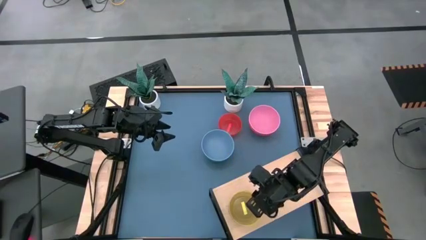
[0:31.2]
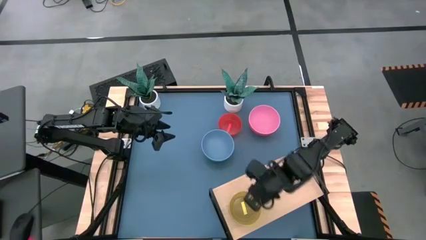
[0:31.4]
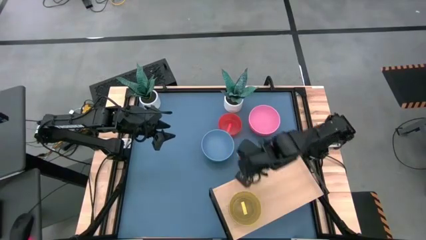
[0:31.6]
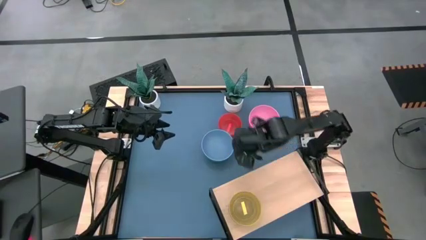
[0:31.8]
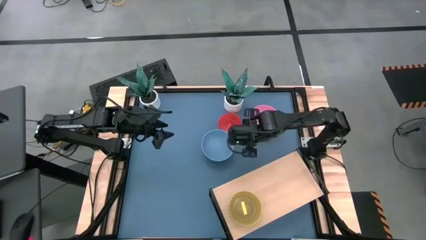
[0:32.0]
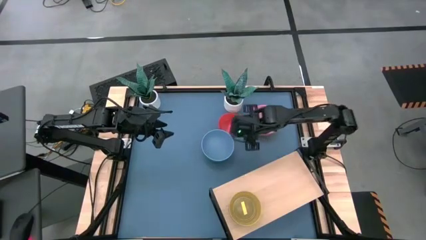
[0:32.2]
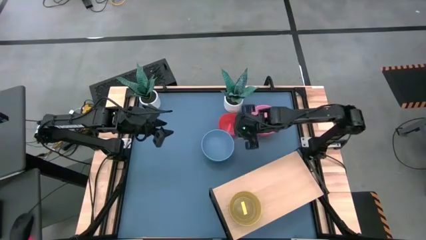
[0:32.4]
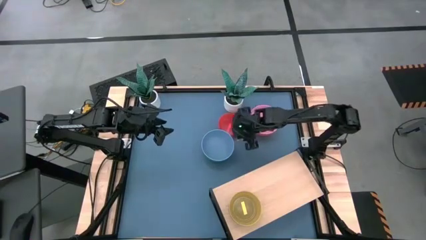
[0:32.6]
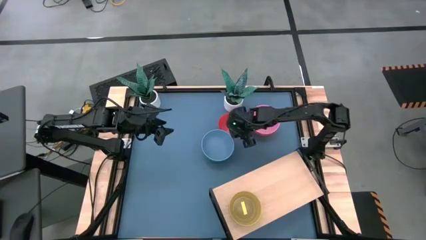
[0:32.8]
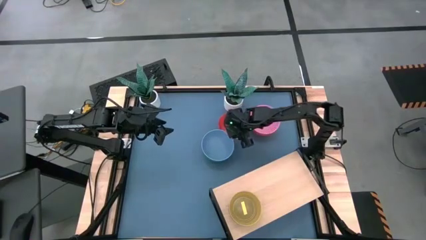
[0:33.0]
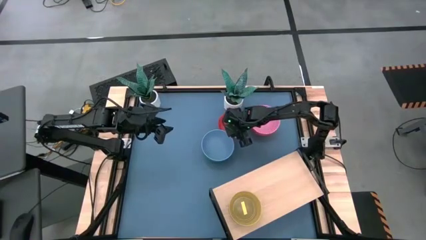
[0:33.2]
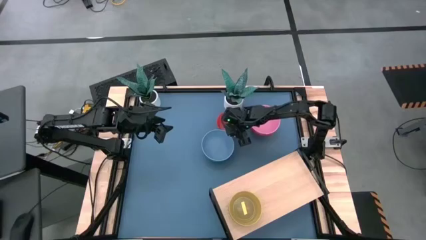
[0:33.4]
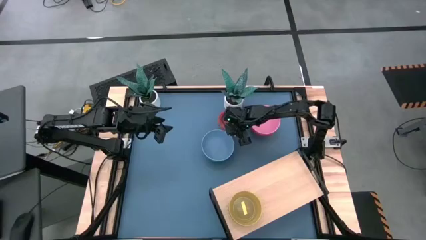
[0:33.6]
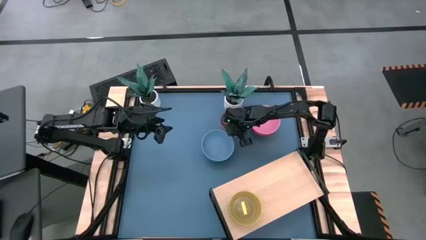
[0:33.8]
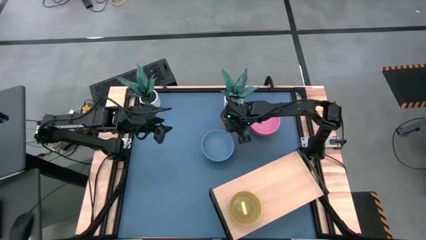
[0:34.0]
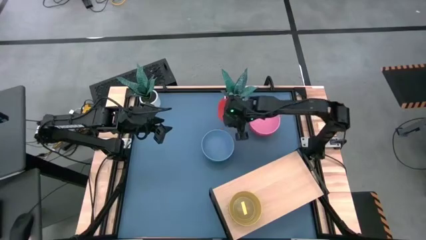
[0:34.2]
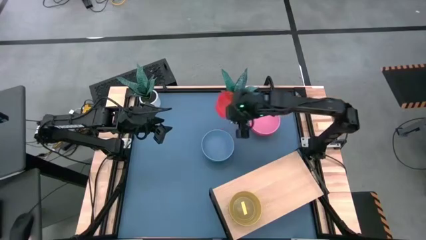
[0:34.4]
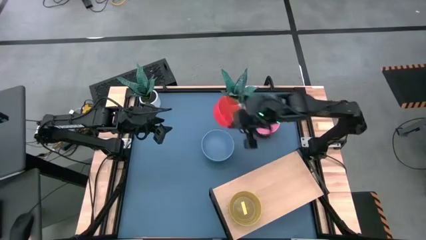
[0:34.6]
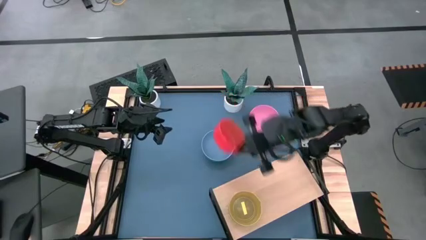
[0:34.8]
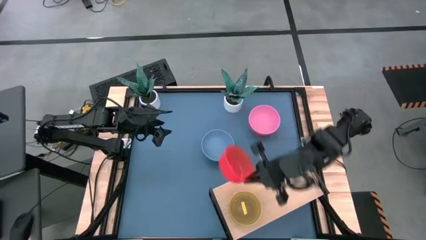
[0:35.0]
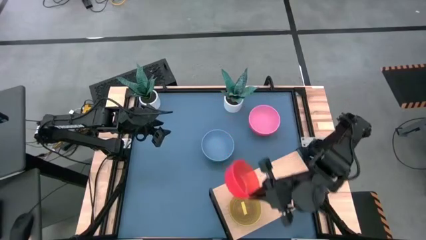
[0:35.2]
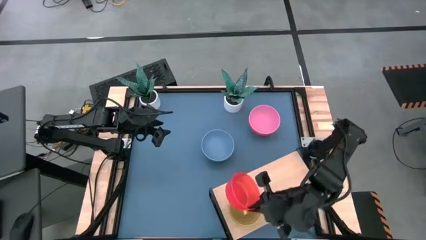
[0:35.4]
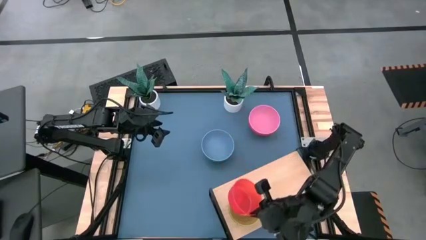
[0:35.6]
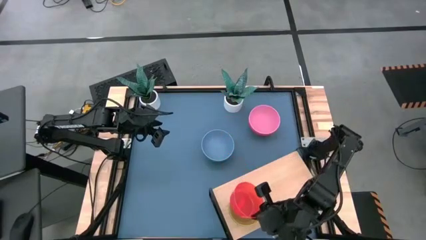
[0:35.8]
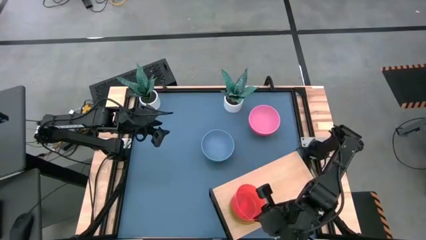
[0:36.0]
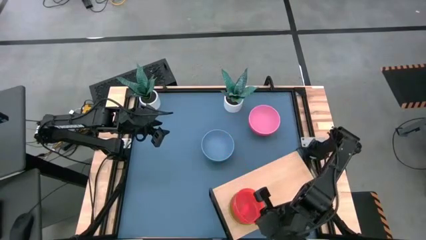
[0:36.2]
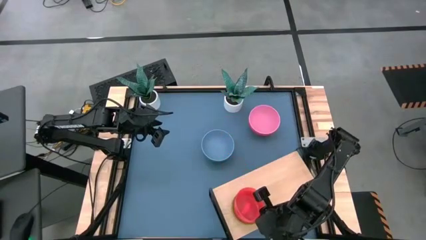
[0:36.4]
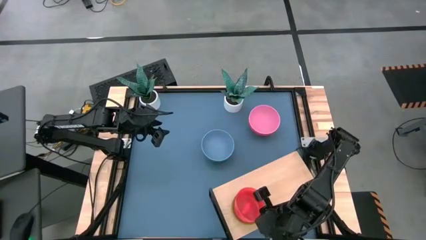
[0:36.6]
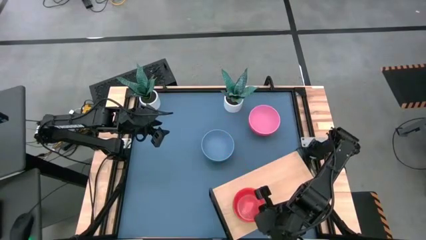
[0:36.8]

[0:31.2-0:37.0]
Task: Place and stack bowls onto a shelf
Stack the orange bowl on top of the yellow bowl on the shelf

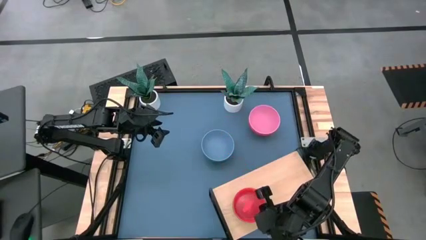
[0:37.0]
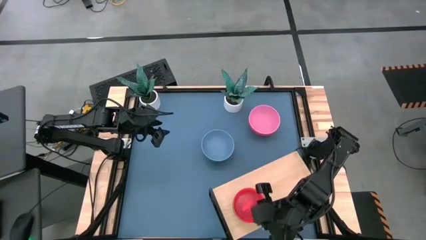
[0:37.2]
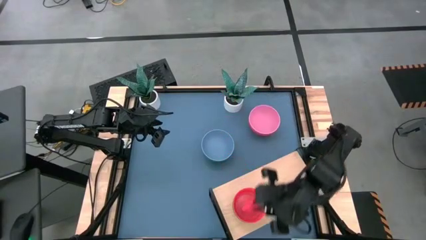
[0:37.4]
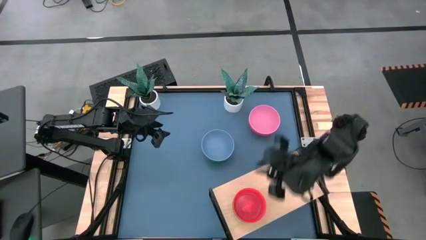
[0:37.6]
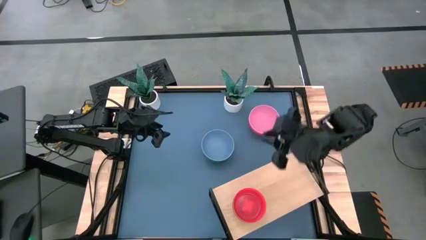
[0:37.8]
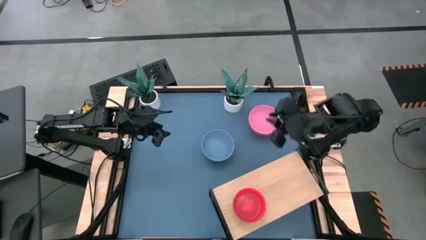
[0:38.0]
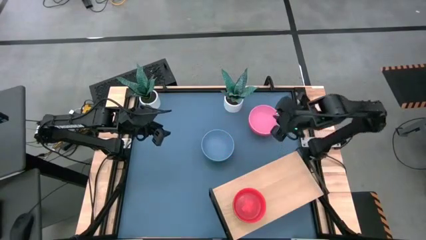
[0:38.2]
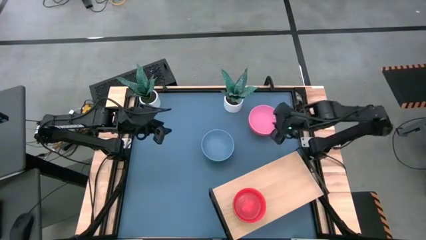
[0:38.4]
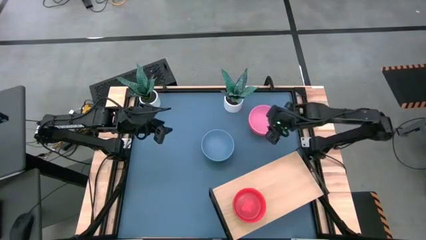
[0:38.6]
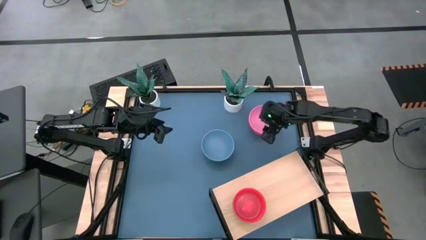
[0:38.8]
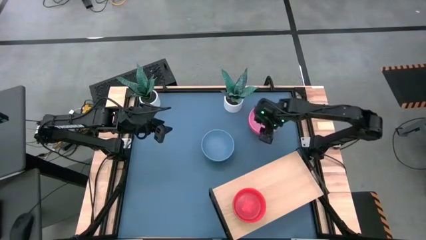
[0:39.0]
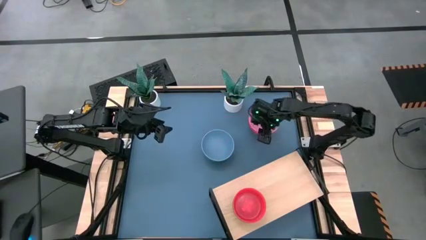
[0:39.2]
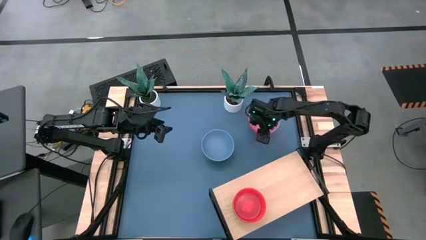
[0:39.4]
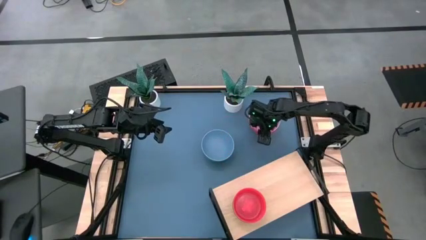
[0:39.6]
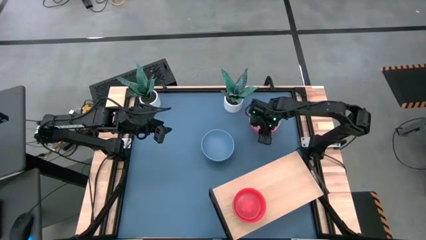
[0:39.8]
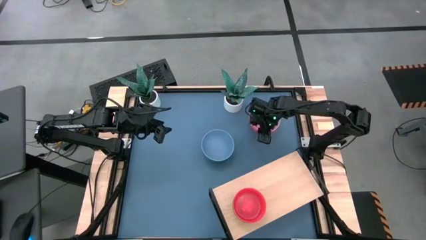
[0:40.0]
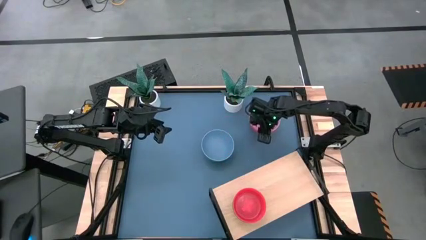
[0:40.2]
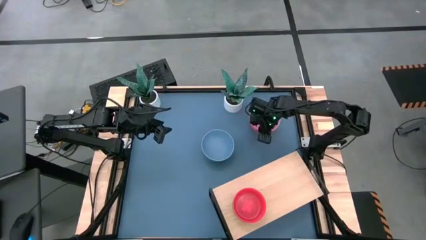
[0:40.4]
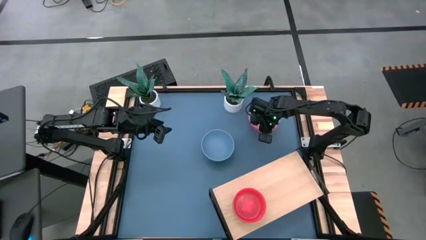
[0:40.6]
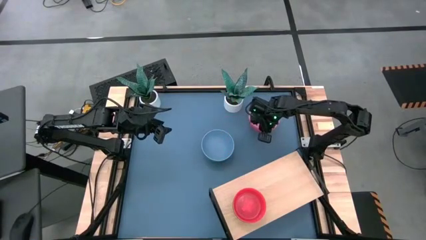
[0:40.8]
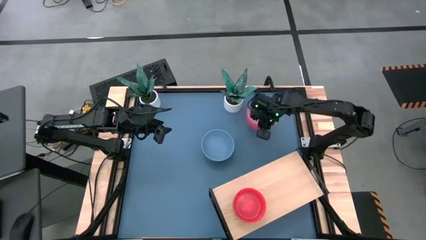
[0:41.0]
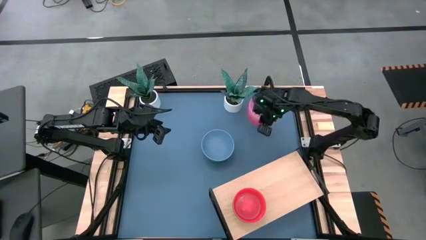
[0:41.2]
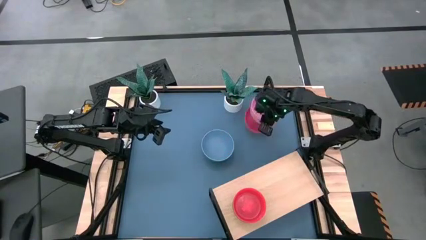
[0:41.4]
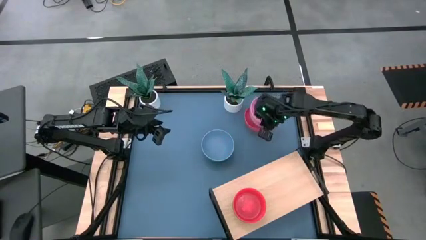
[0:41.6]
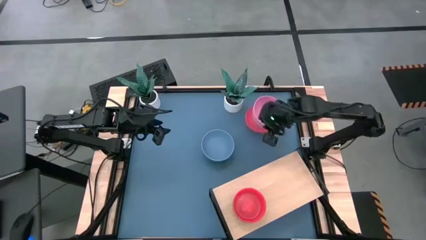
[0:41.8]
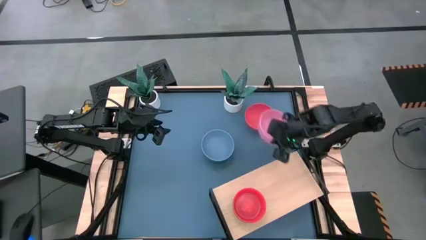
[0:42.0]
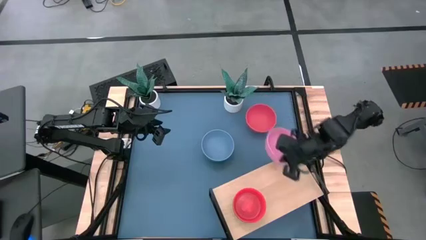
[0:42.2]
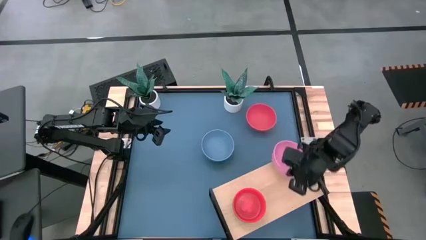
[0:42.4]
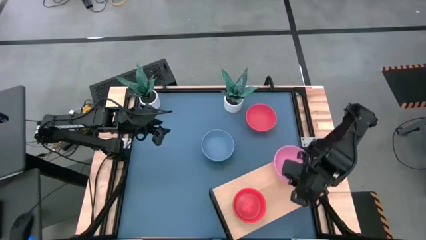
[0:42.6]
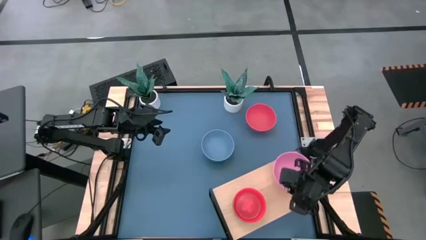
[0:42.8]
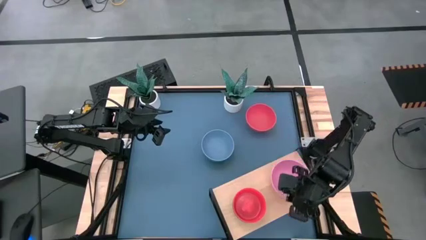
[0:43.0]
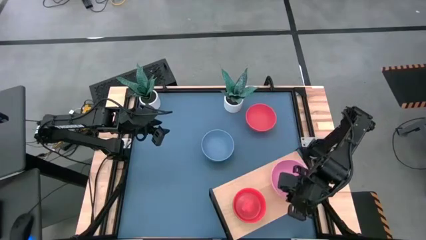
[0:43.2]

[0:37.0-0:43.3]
Put the pink bowl on the shelf

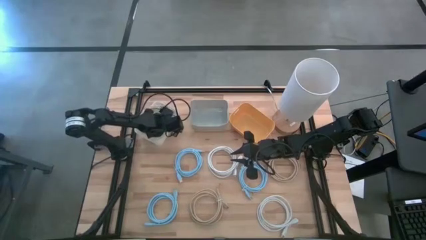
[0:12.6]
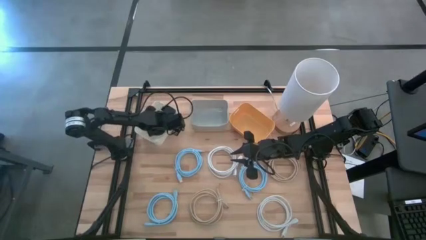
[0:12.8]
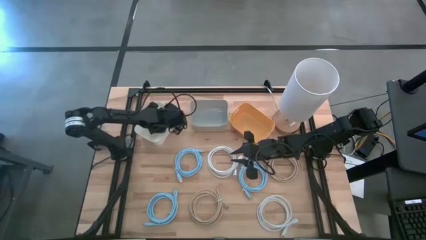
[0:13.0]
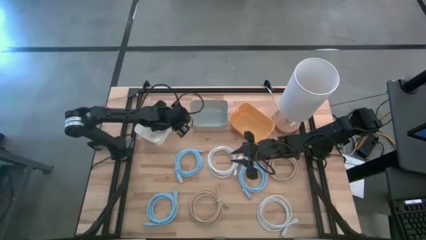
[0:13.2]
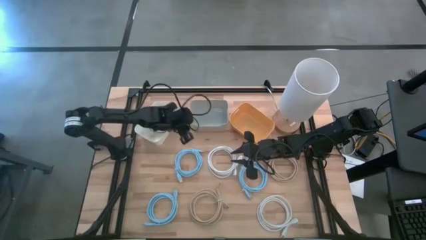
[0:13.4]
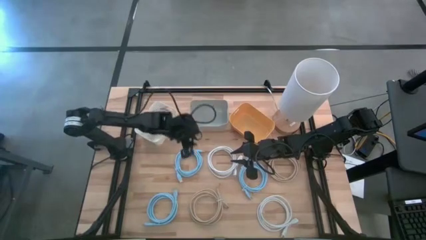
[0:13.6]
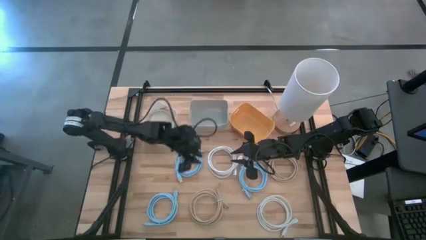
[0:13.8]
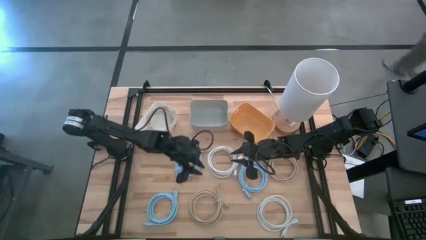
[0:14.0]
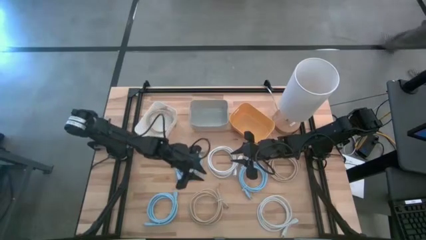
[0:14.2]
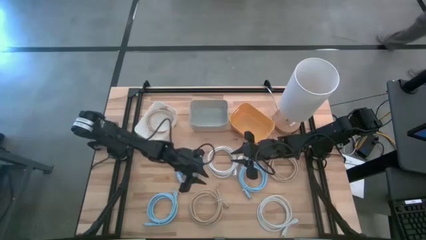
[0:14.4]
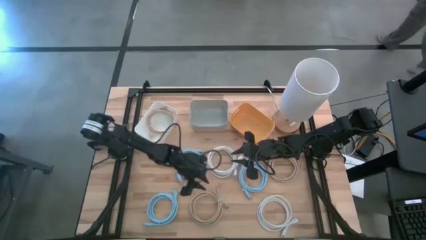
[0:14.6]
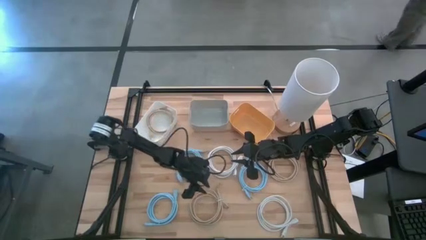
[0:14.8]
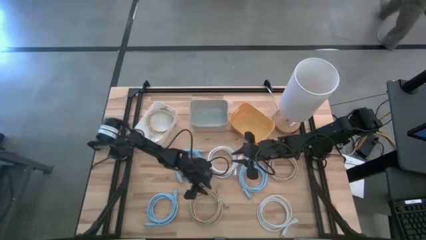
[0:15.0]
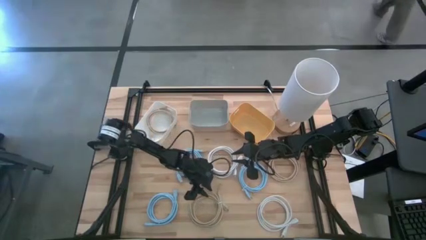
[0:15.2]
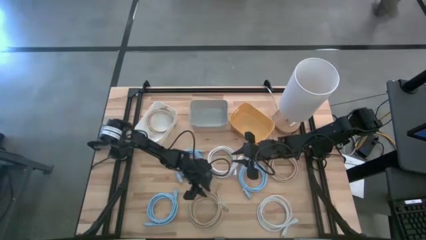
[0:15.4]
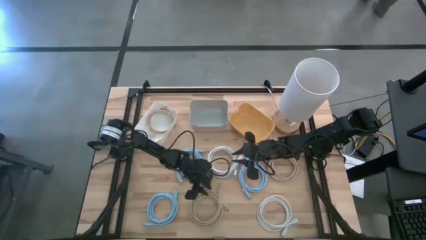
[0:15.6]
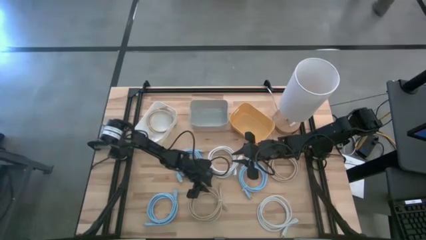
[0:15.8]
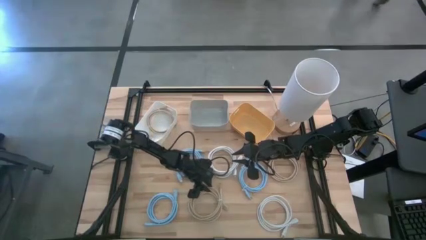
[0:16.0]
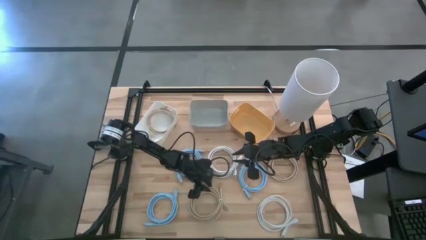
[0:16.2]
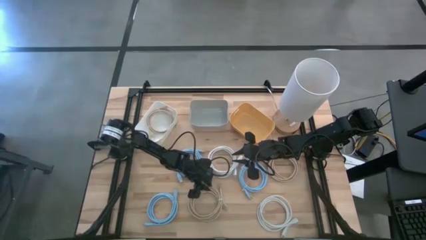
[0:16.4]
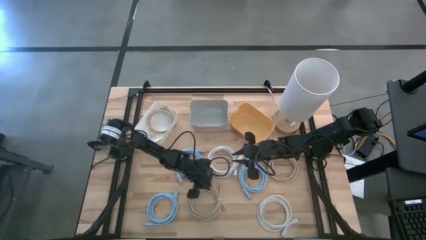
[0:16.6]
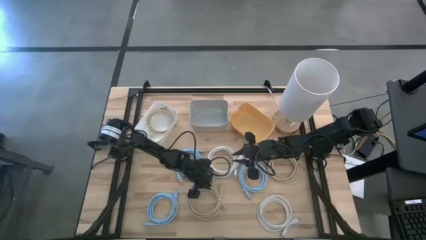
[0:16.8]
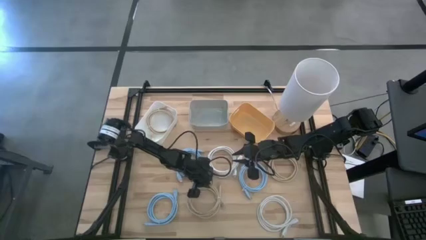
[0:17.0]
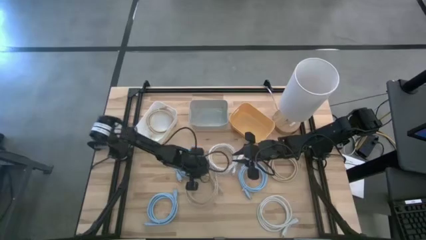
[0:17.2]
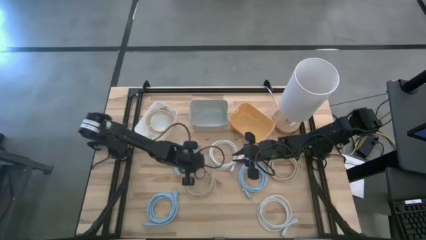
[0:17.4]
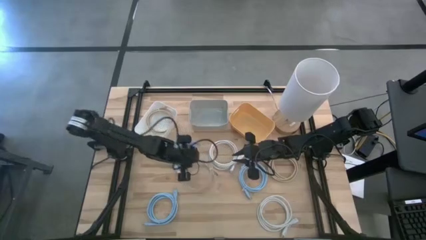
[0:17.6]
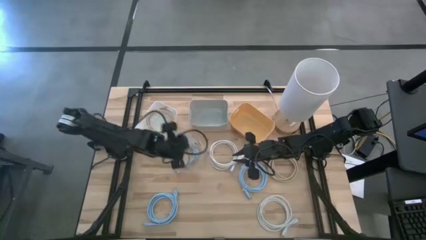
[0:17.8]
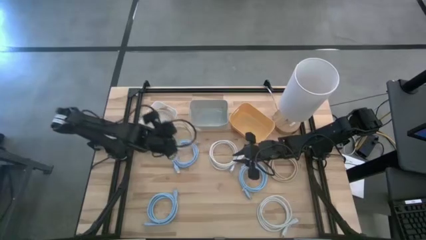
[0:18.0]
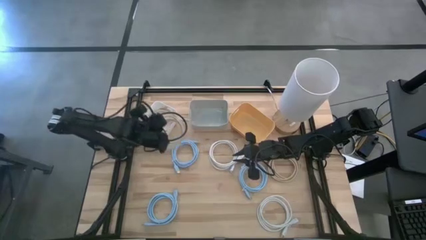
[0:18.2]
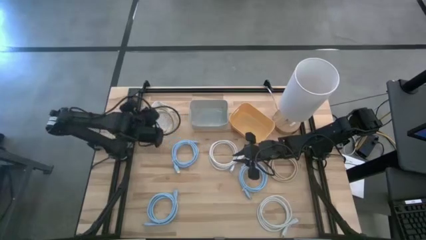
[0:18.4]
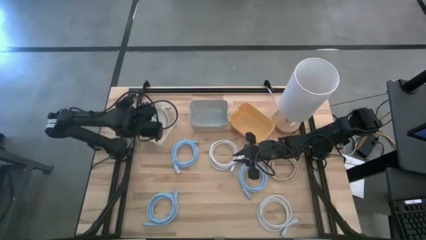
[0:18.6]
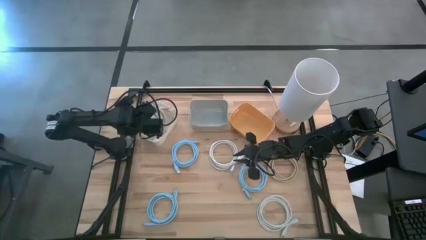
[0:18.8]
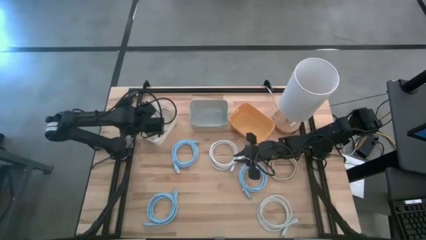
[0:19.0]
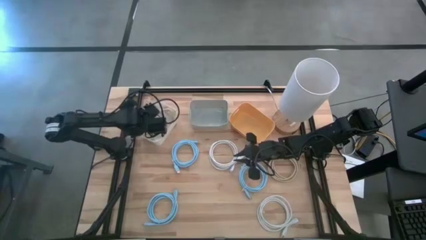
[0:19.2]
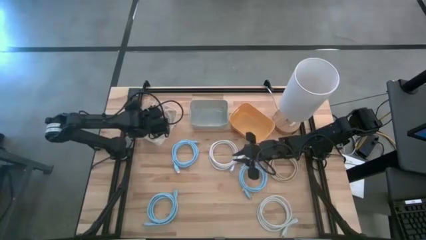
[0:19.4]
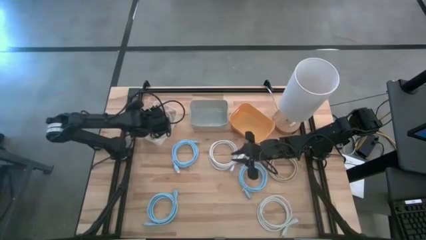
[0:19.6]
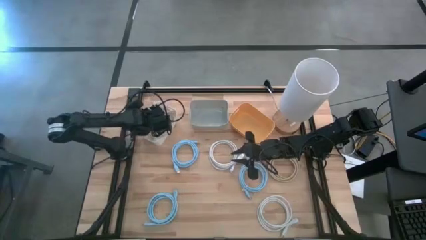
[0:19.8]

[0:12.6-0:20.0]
Task: Sort HDMI cables
Put the bottom brown HDMI cable into the white bin
